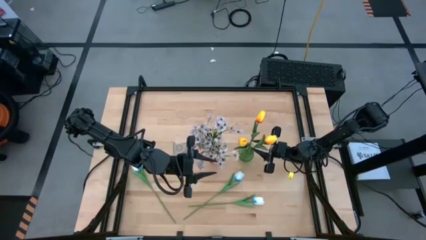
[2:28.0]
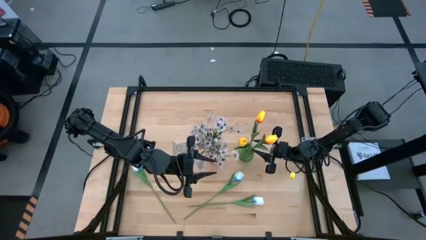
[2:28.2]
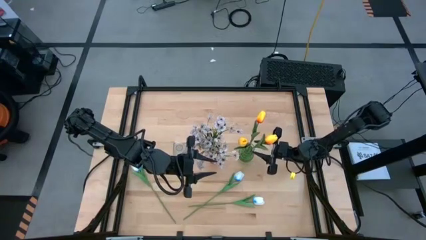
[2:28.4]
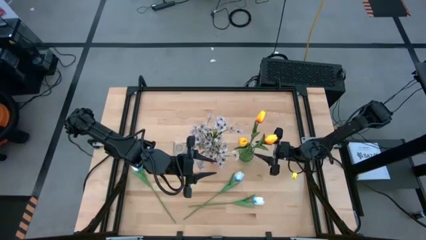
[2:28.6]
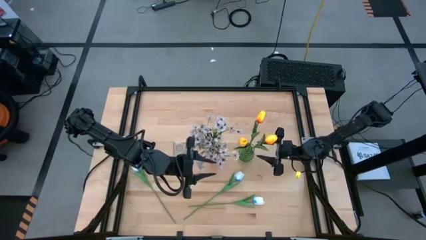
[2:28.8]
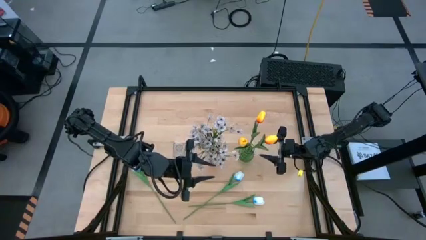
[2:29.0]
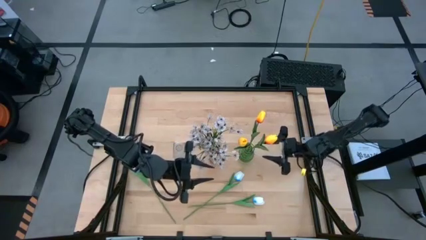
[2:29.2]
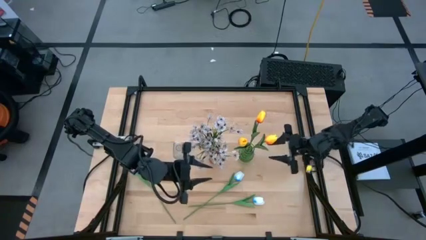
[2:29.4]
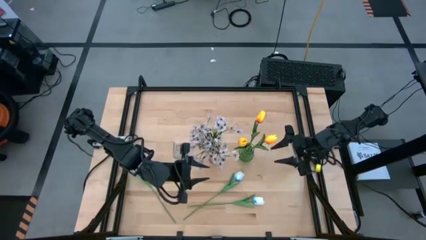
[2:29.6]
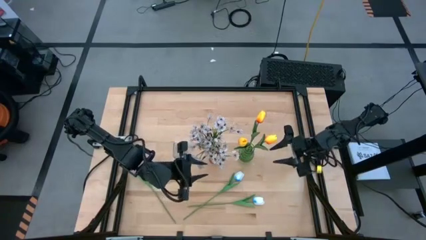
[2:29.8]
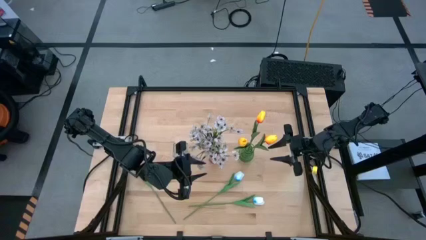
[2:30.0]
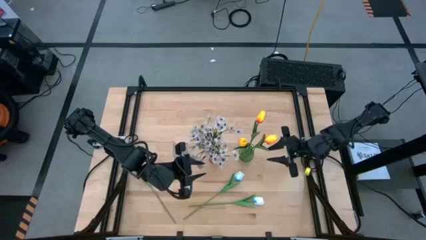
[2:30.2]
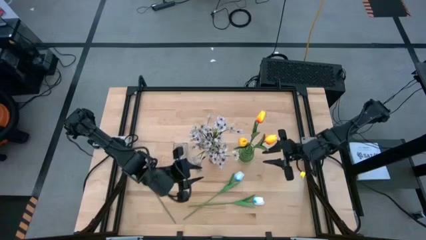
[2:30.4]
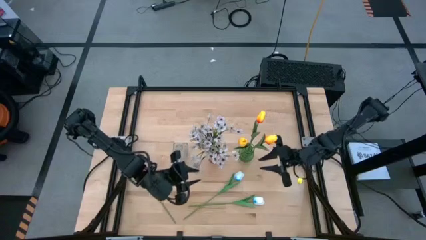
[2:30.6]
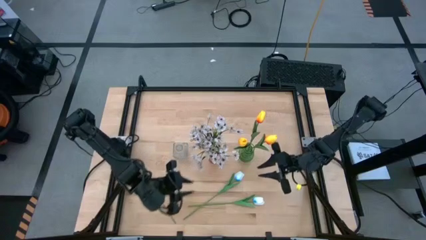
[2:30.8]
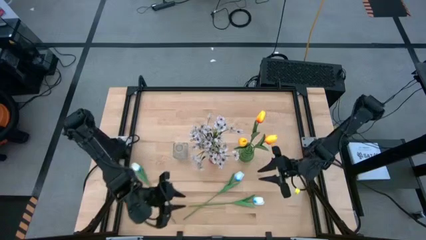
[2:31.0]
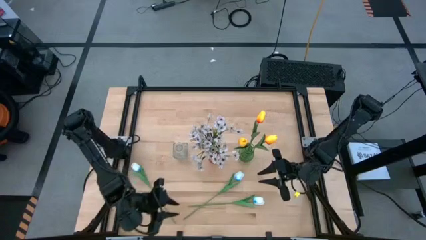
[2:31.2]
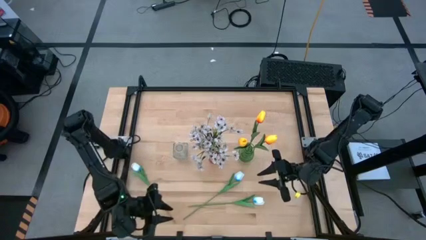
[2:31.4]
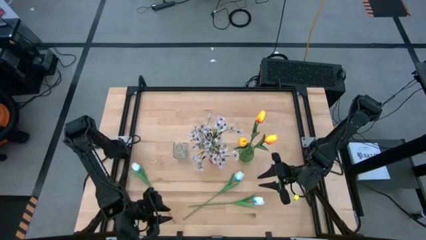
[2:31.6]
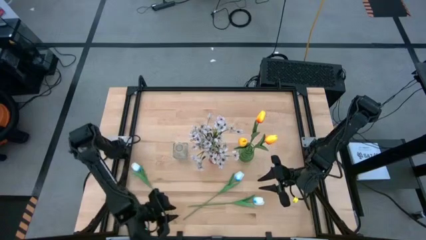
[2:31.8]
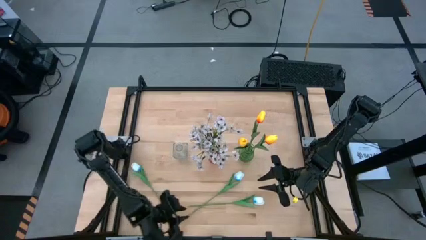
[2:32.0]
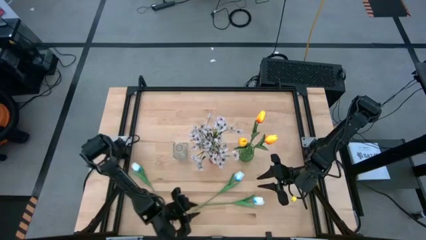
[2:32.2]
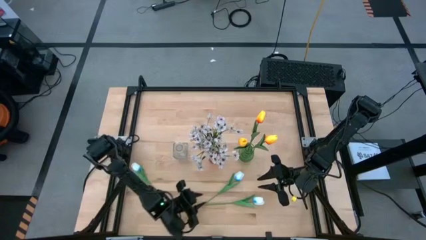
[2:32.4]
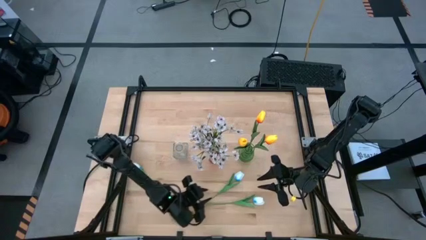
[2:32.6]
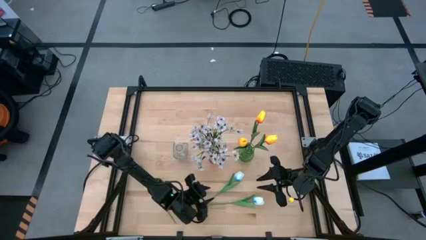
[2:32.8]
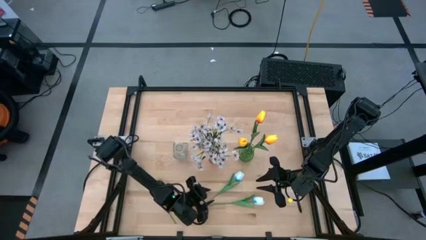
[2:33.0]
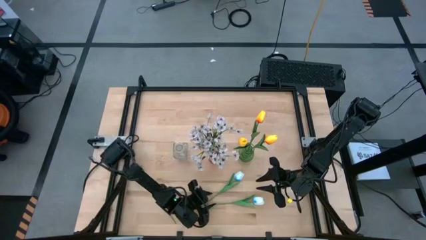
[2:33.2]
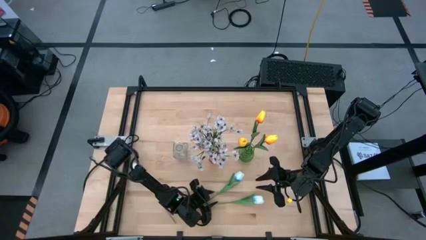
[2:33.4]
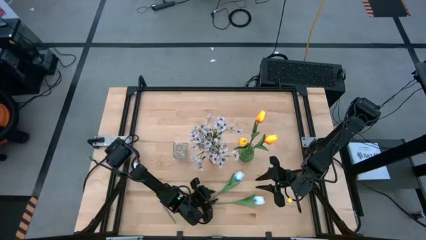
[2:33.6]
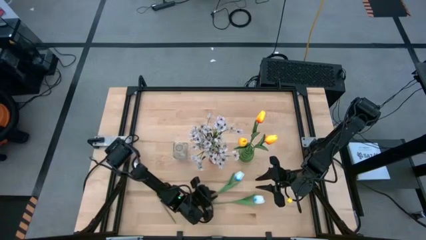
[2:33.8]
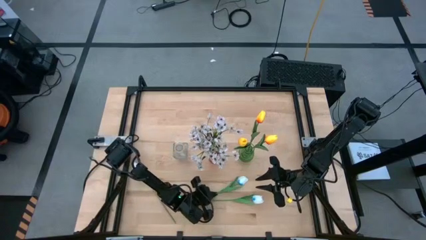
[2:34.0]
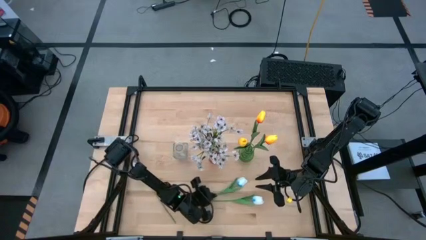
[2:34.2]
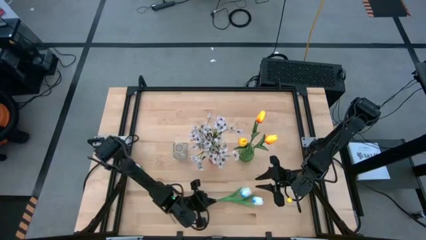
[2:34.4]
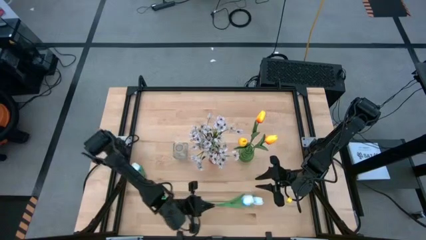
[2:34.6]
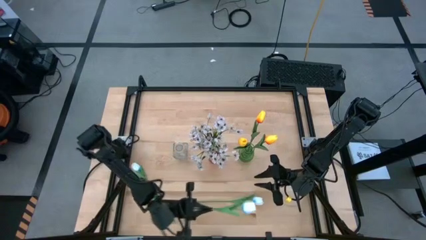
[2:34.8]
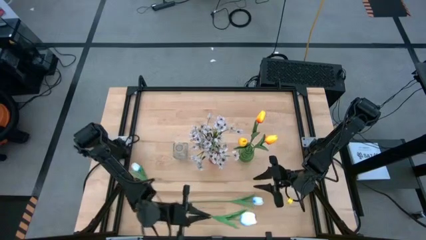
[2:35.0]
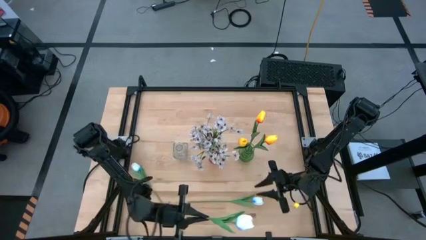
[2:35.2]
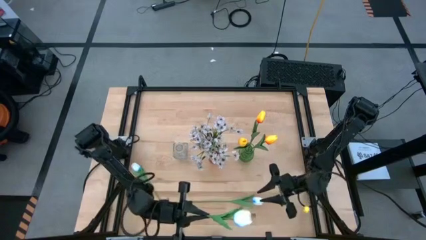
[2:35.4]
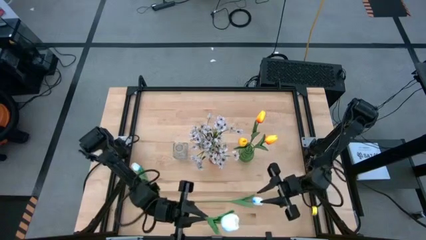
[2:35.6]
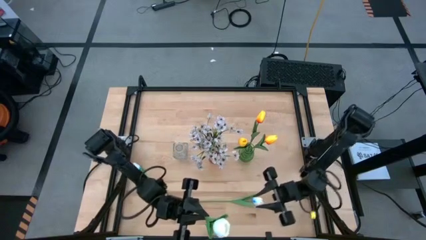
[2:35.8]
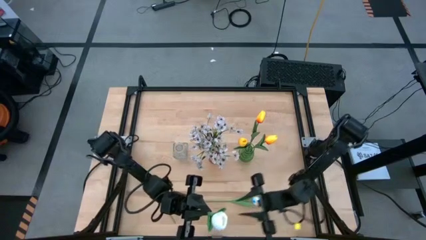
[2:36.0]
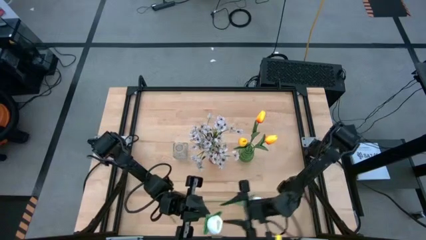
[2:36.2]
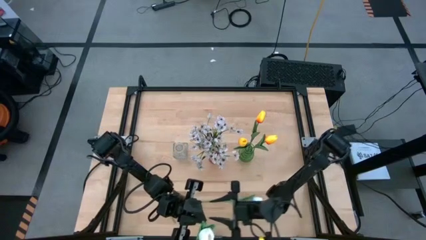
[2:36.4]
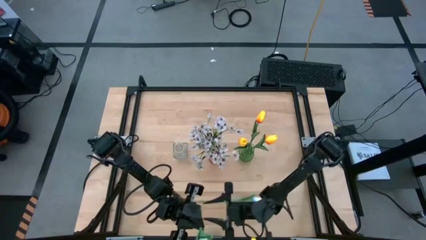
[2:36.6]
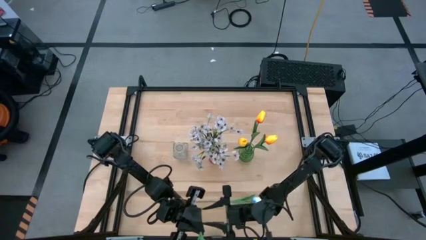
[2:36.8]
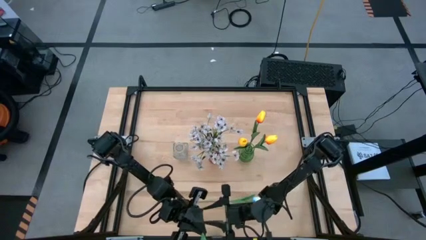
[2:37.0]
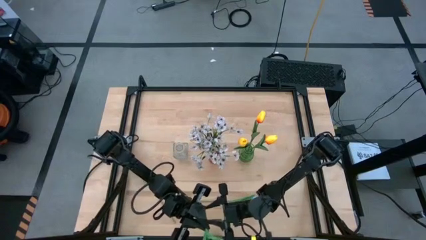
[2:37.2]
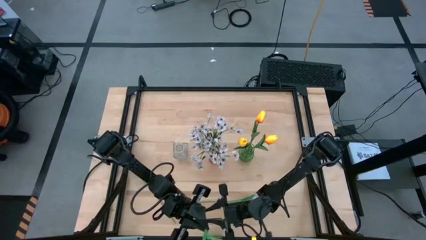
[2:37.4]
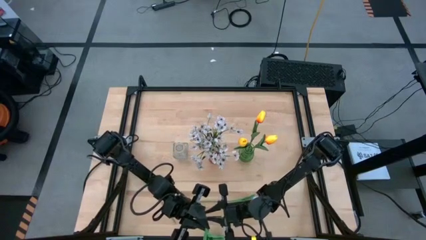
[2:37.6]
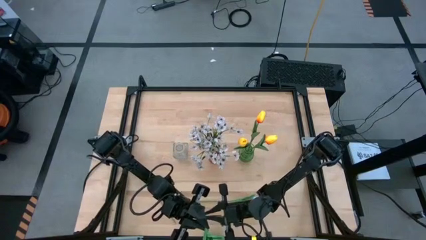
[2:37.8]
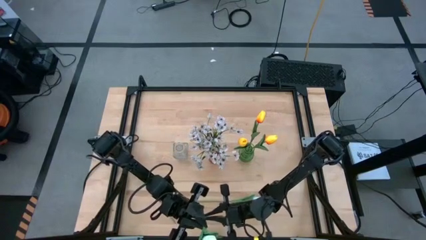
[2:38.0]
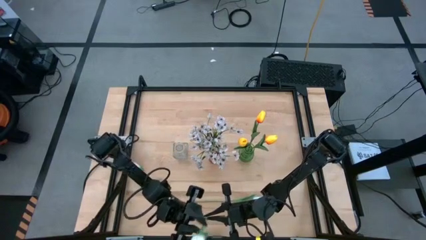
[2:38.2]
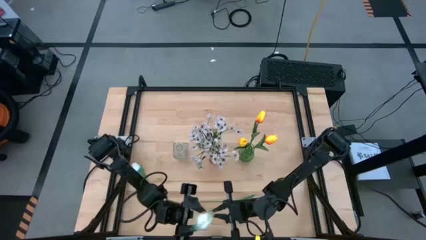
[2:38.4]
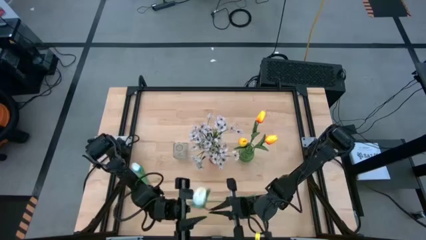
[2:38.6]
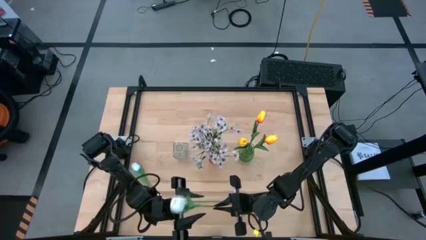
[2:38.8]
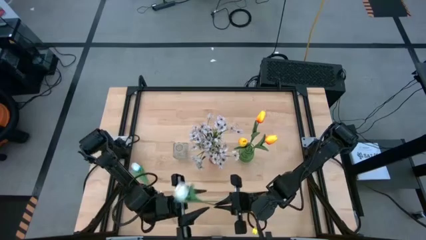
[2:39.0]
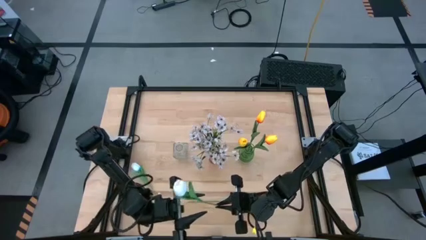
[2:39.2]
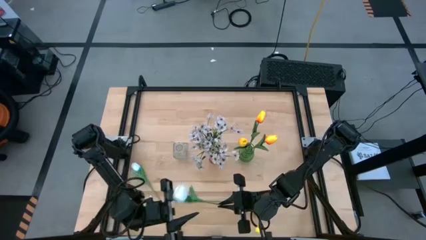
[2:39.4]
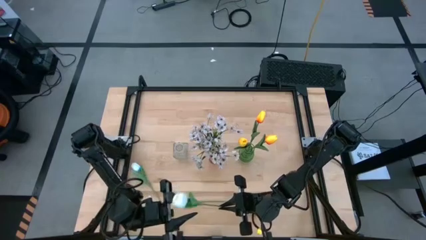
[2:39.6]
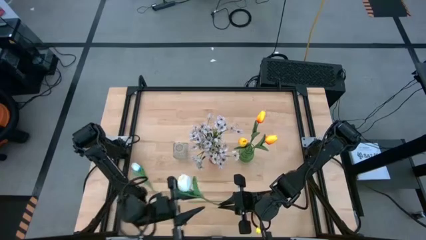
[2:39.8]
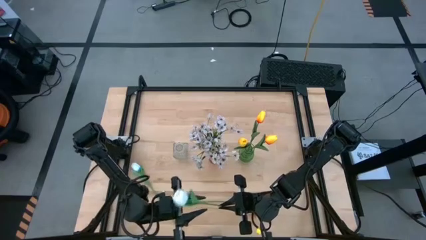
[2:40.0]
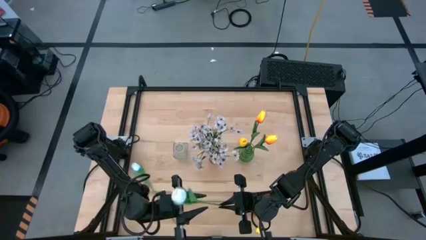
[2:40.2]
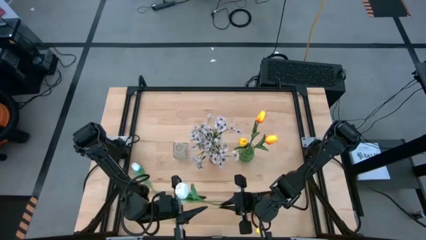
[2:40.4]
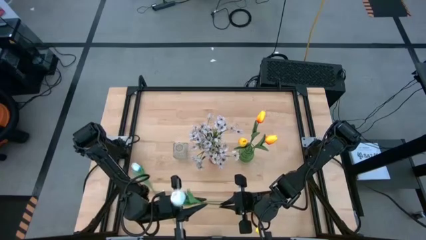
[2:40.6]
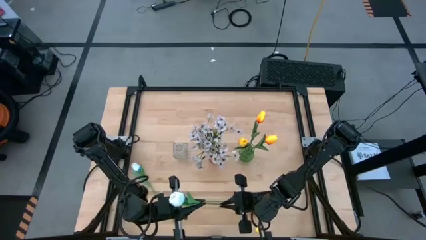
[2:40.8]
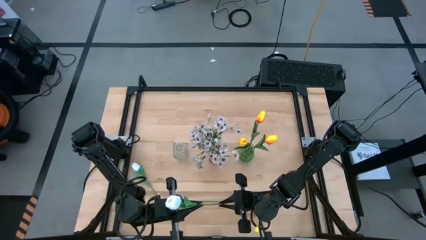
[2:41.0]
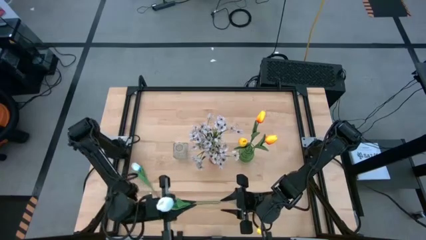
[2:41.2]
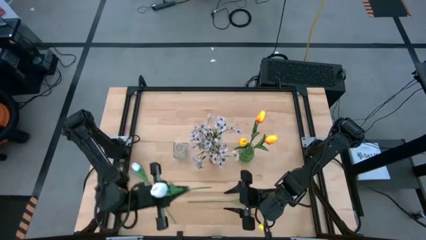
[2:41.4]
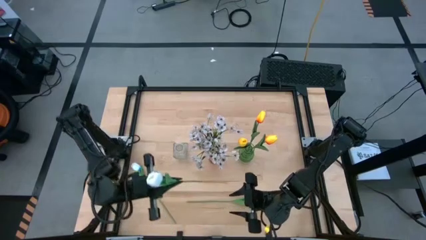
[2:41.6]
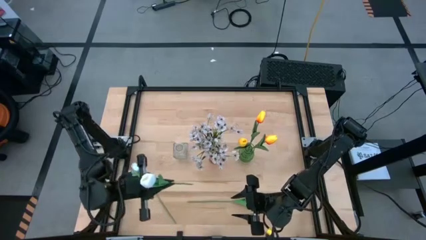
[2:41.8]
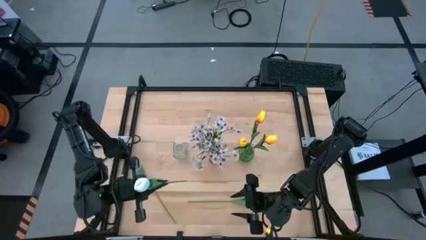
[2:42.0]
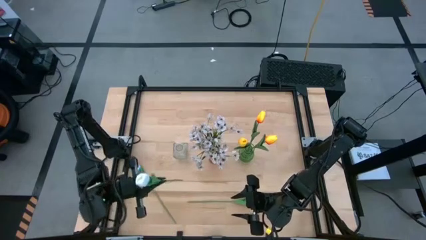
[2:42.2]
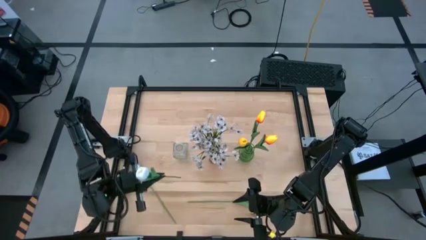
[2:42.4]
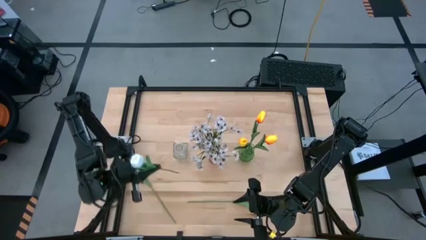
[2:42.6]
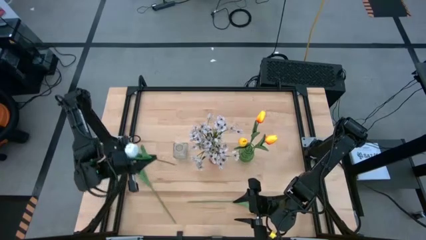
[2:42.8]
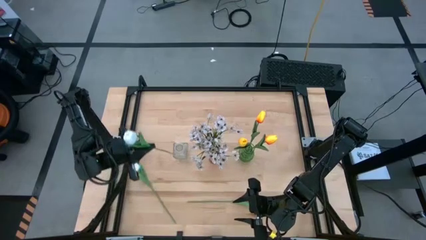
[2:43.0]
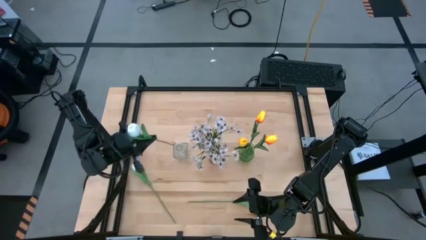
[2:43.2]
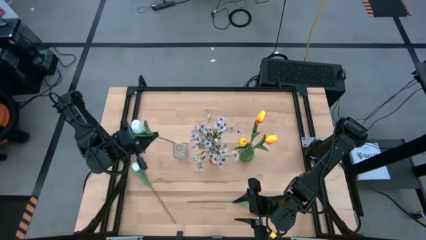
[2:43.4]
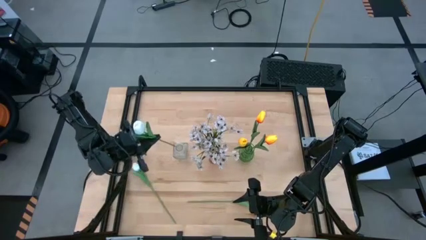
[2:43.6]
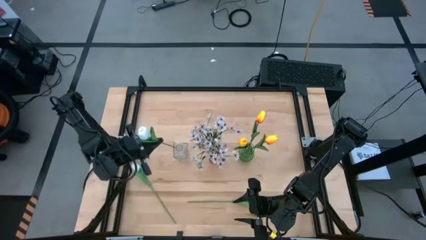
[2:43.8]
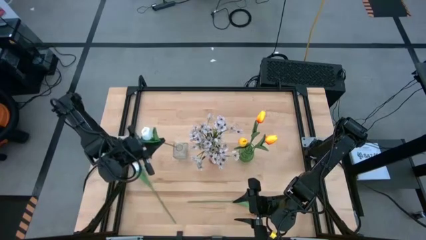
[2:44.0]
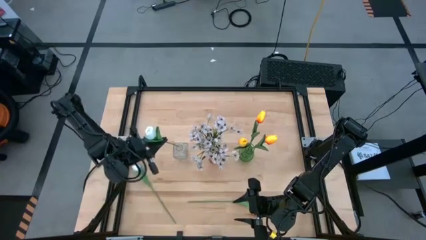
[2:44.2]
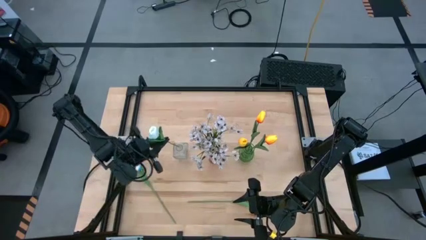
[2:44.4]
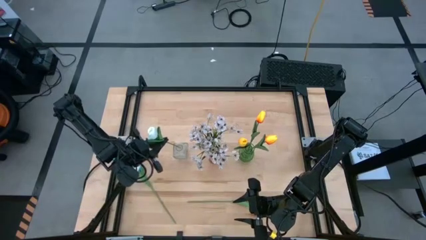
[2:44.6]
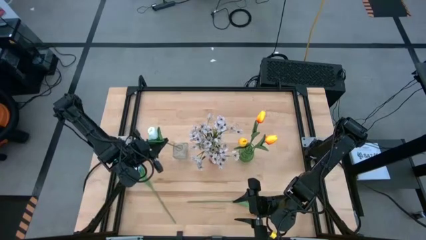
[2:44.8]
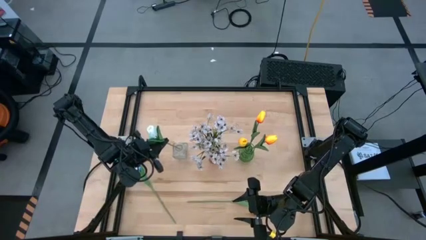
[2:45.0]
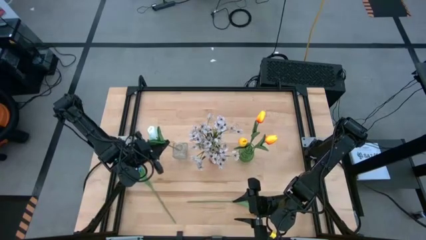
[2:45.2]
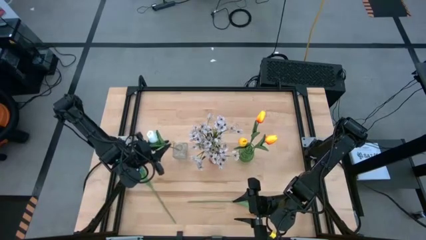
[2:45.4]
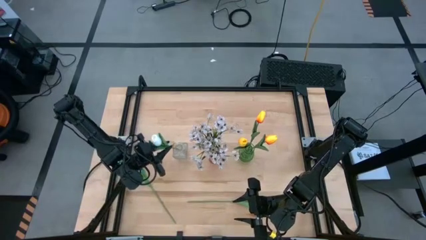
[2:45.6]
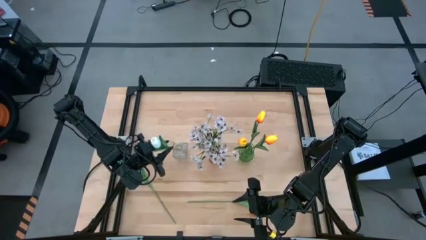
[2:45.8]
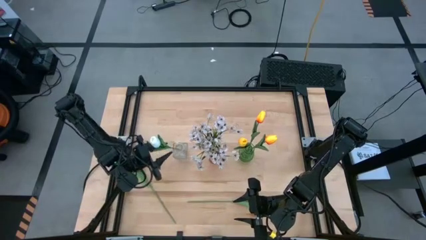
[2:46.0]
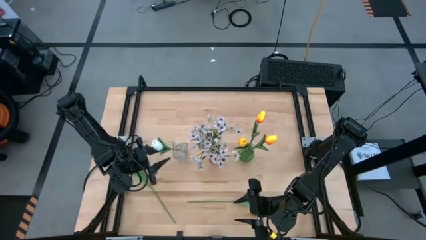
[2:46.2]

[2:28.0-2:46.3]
Task: Sort flowers into vase by color
Put the middle white tulip into the transparent vase
